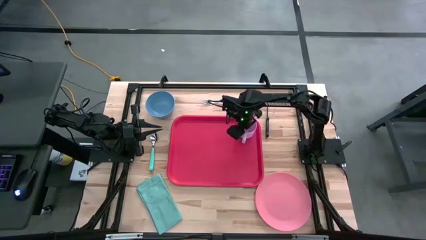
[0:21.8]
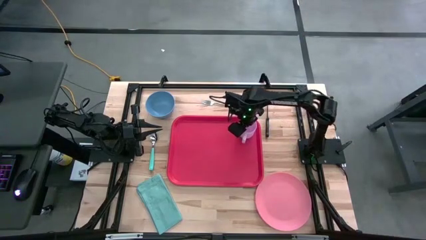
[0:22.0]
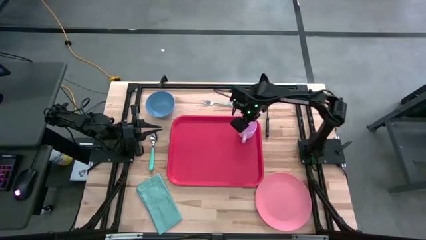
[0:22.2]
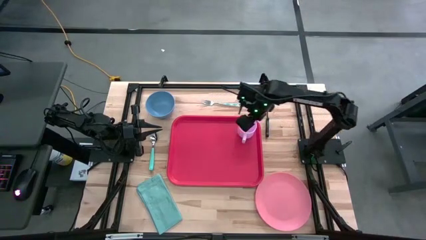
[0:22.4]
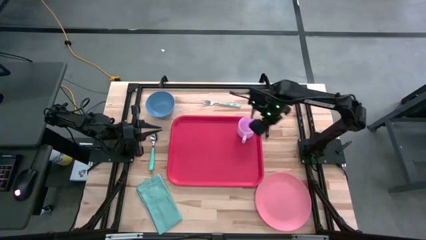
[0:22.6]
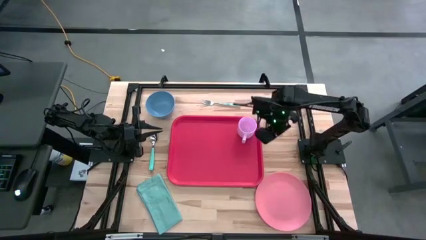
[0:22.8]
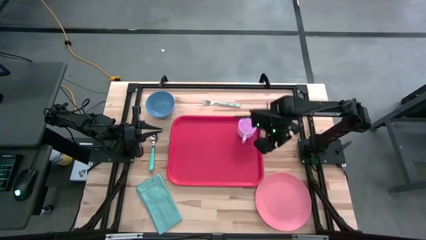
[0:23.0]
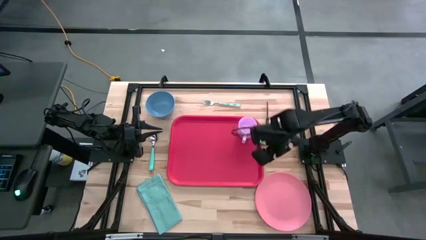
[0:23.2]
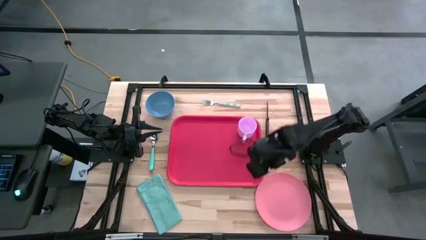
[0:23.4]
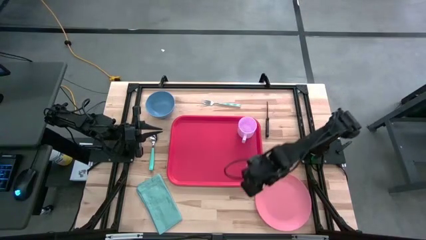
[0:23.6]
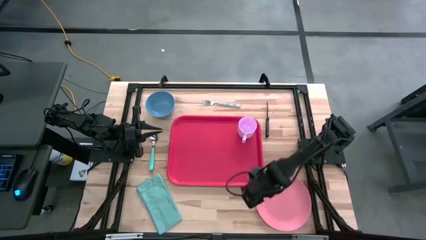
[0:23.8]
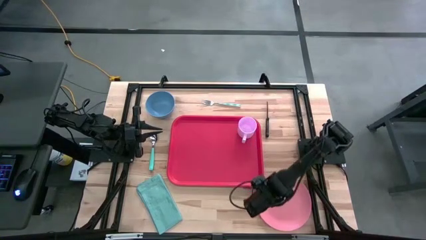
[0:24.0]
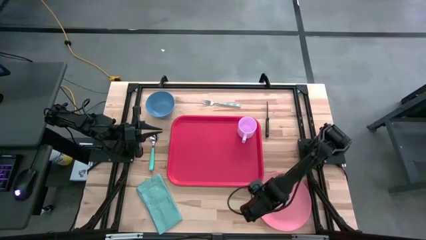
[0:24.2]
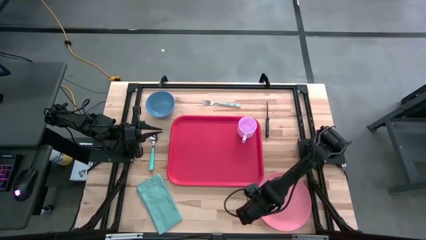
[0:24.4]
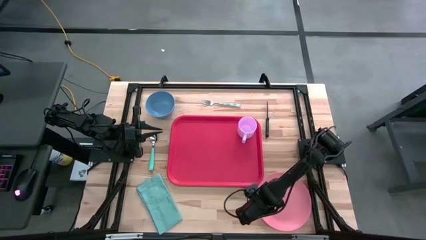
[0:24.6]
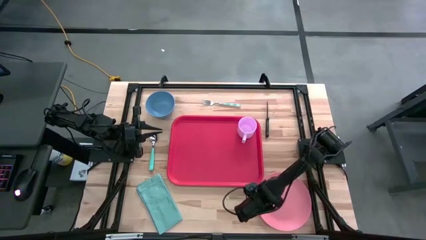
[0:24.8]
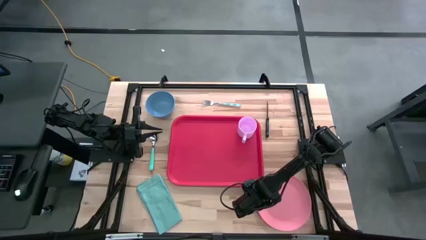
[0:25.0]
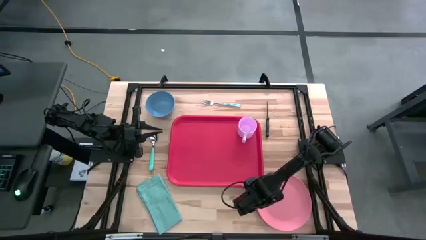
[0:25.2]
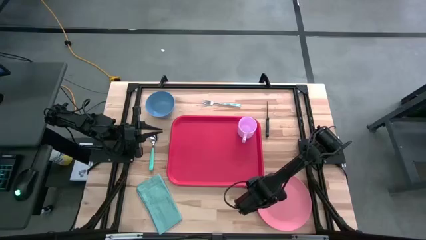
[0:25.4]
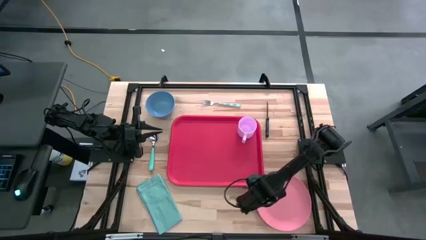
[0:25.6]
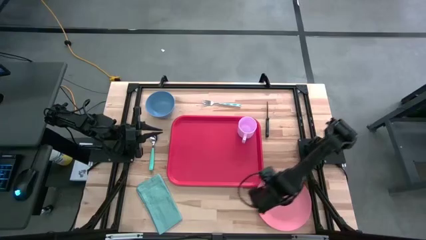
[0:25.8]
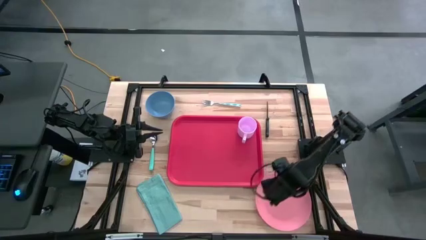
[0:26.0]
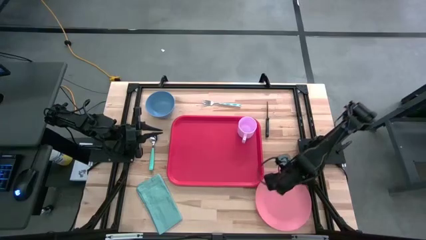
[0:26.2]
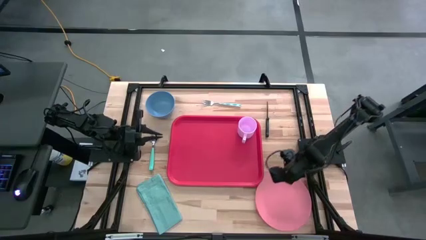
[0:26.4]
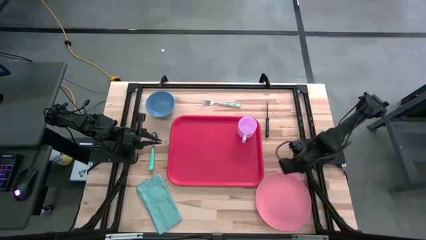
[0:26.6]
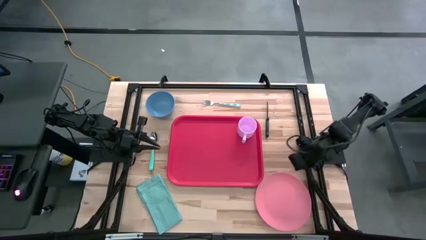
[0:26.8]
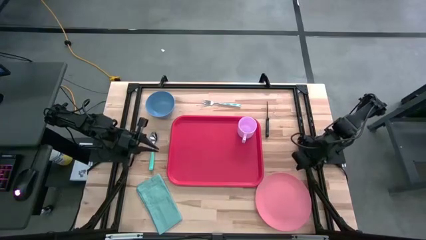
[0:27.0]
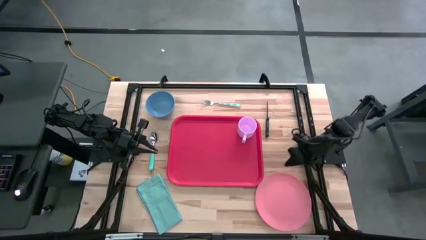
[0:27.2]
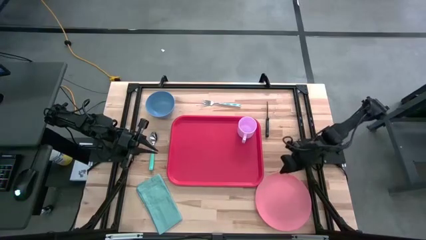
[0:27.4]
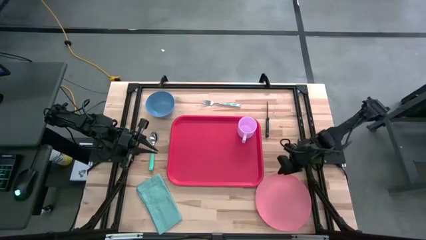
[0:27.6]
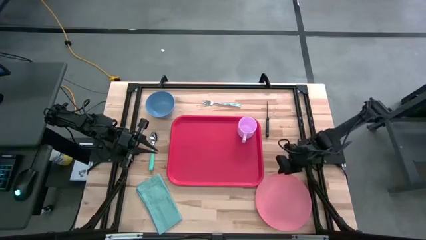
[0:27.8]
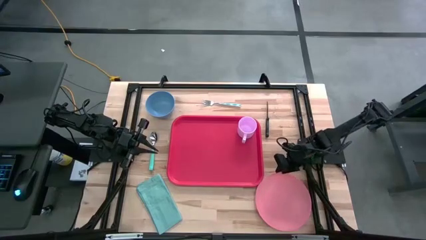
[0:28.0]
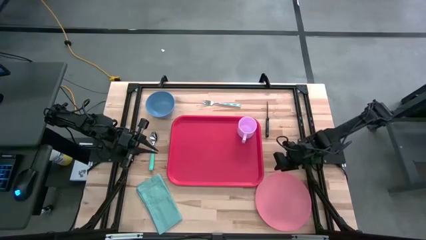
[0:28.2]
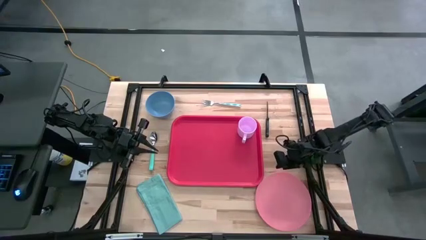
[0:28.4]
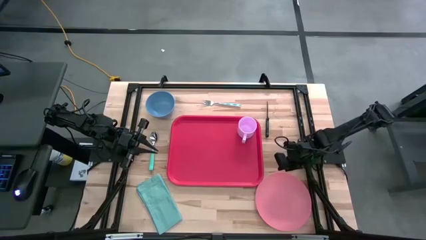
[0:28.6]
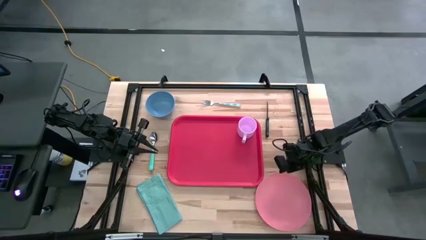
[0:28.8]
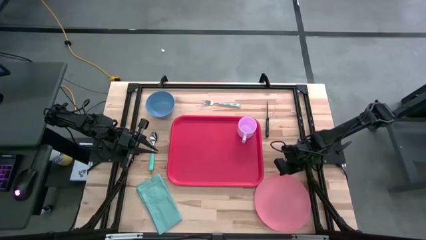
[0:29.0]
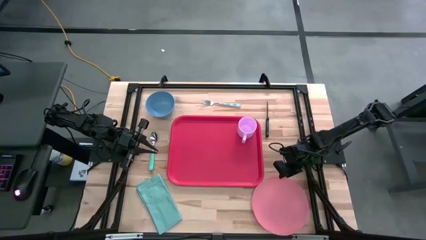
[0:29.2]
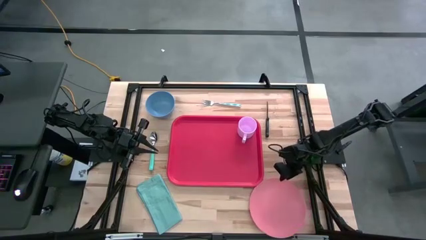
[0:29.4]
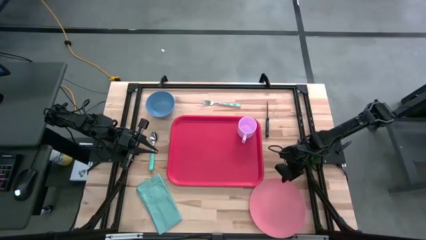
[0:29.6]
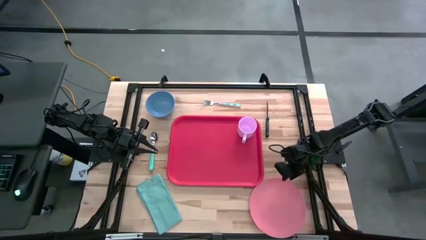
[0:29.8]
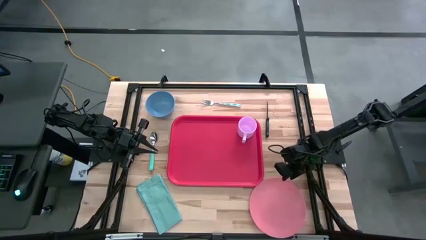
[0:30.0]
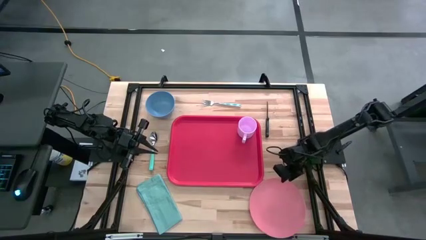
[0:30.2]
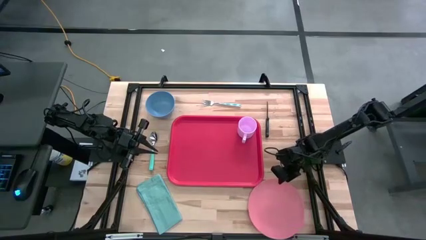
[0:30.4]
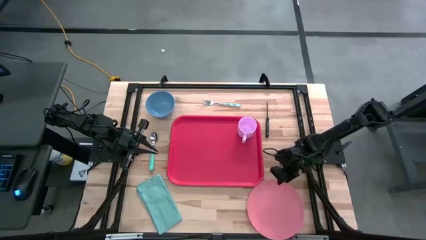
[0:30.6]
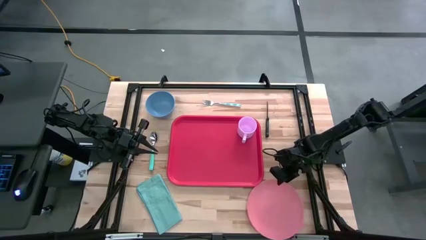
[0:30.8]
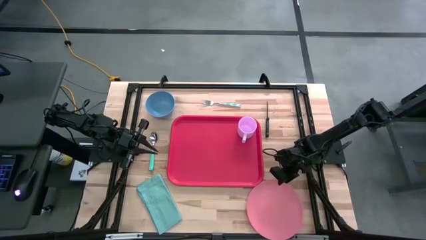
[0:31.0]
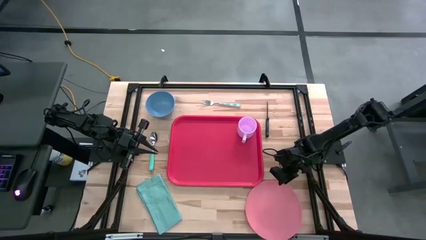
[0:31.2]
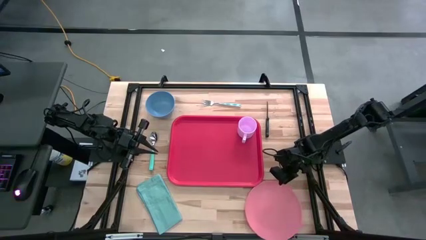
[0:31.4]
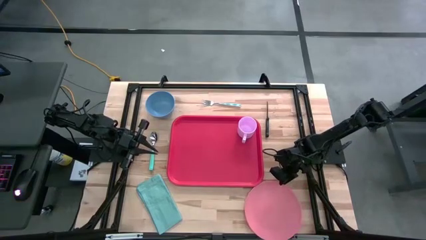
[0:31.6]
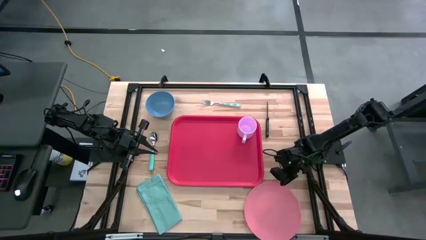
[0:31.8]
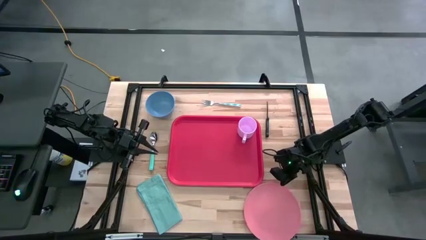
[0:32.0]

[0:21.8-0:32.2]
Task: Set up tray
Put the pink plate on the red tray to the bottom left of the purple cup

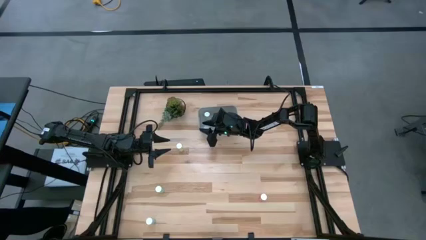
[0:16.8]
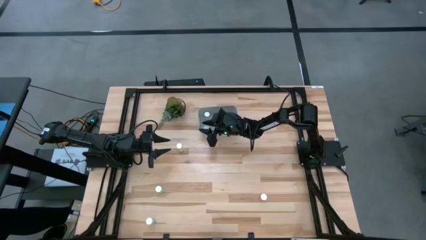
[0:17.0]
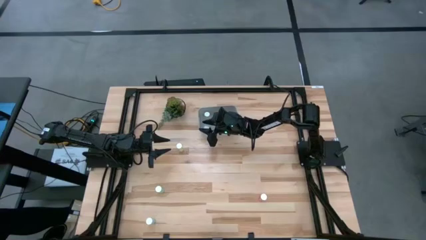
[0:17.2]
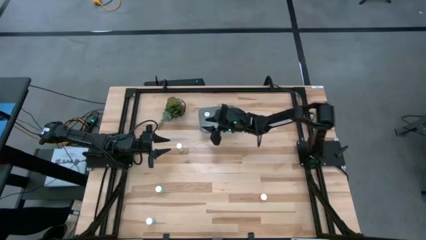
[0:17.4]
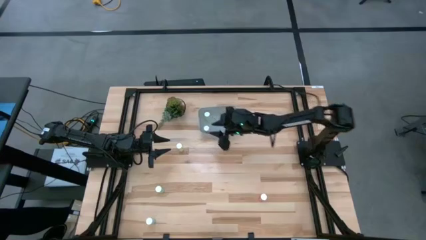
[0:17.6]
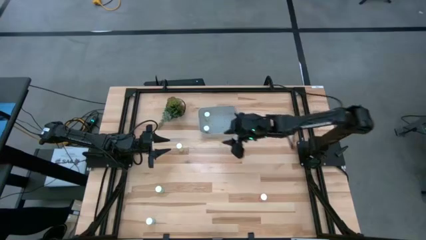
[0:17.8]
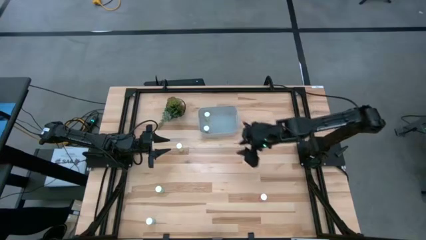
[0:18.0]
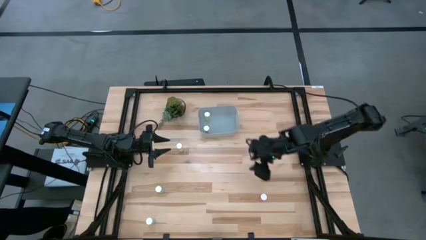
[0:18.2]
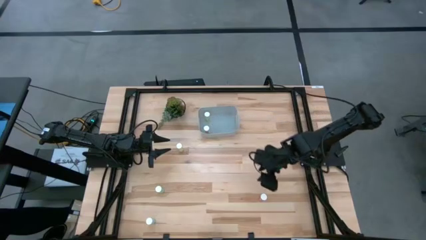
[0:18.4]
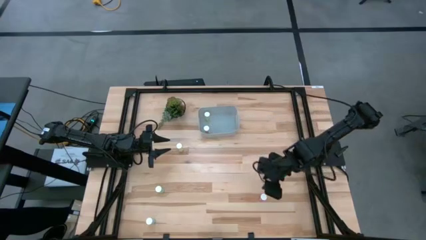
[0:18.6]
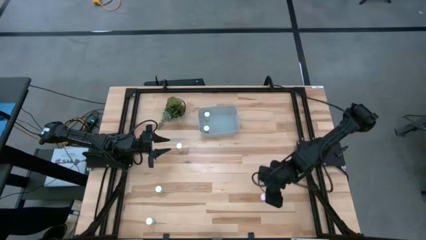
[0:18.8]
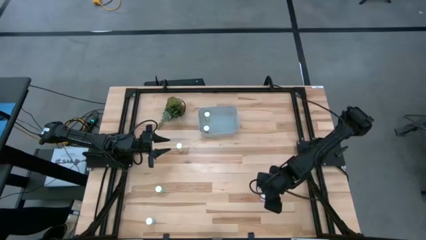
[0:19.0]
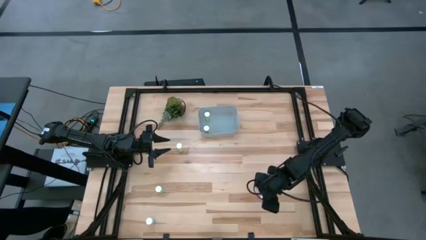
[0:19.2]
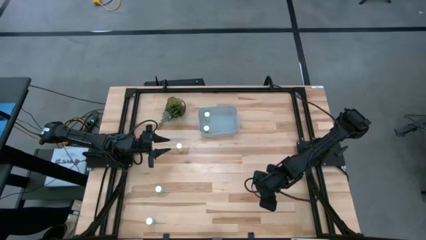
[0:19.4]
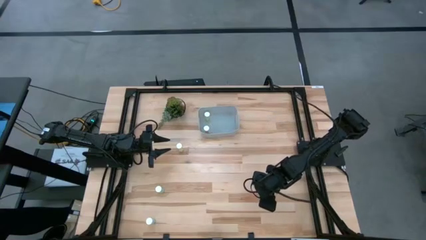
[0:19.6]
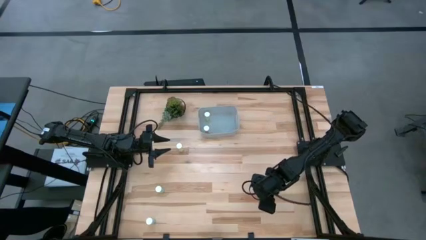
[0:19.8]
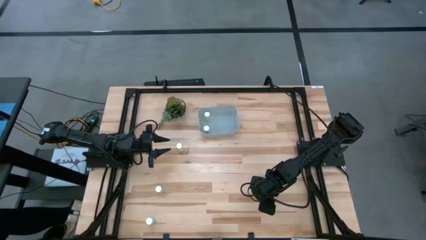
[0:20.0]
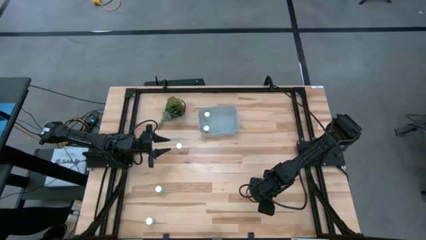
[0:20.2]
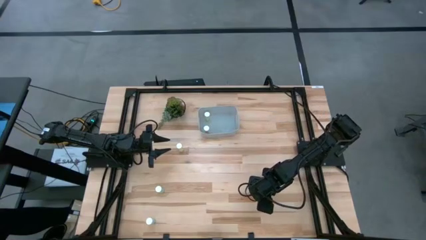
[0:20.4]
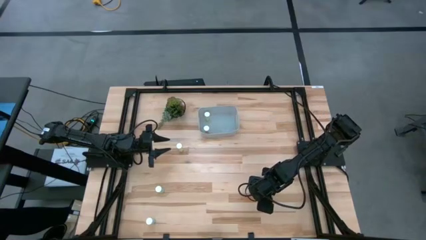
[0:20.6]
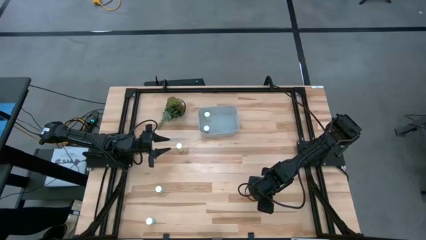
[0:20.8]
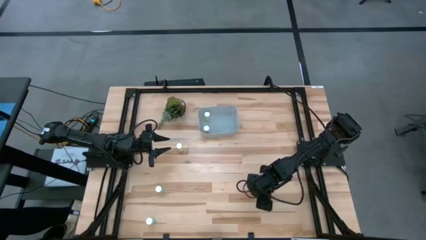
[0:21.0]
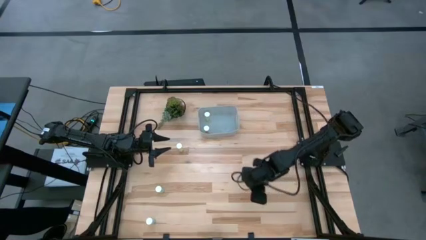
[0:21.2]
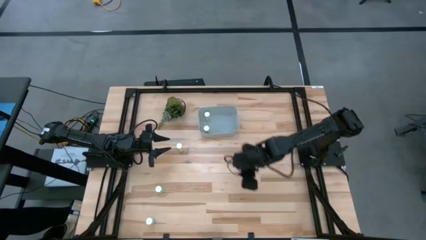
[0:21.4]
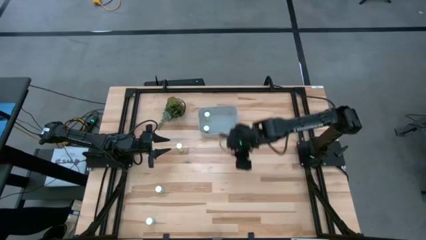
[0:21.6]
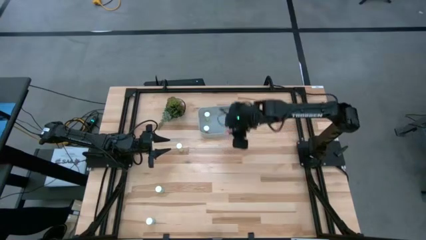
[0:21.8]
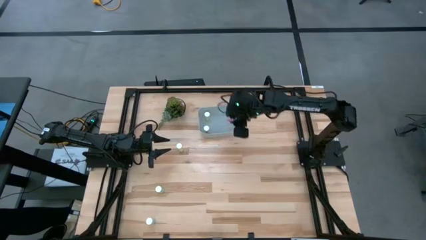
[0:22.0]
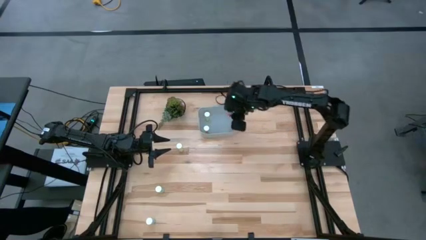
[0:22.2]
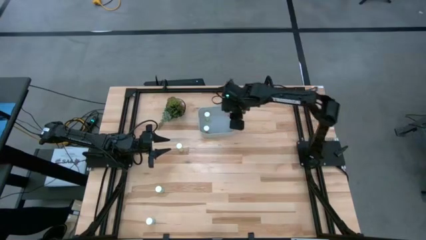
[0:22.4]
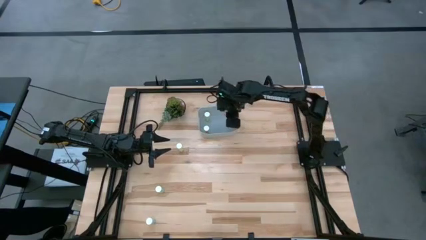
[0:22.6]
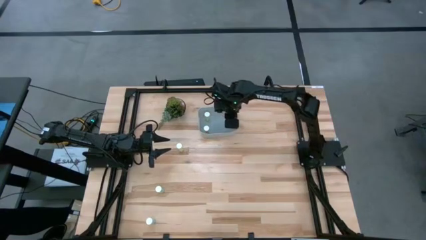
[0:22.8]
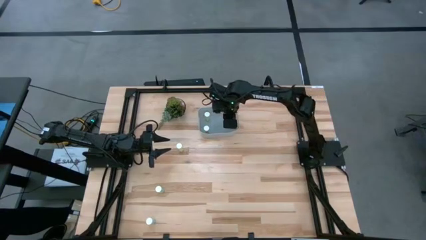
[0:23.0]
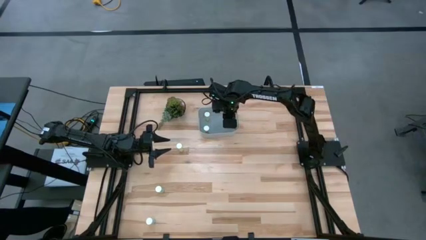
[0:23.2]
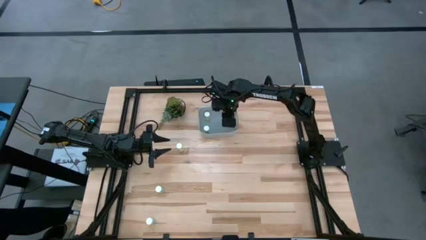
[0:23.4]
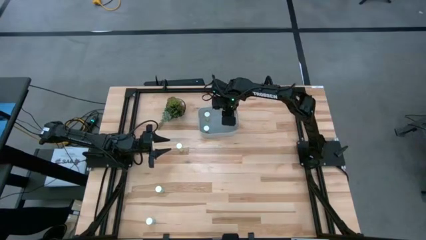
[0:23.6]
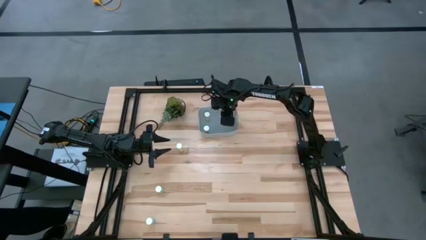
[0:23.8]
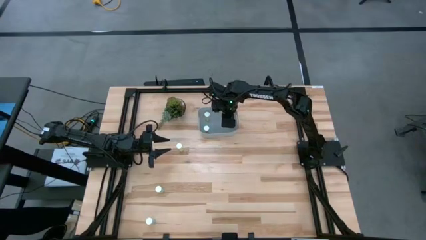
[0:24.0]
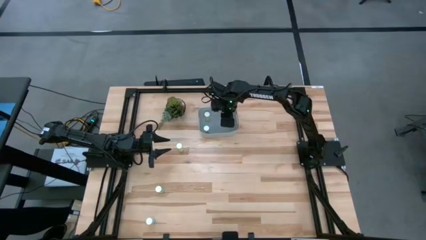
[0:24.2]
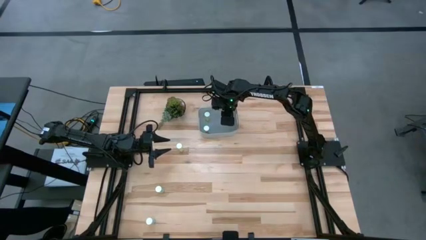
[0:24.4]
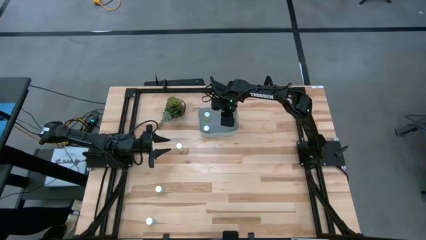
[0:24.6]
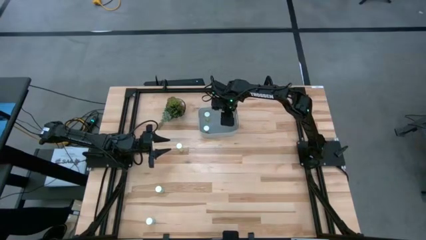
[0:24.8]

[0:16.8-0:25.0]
Task: Pick and place pill bottles into a basket
Put the red pill bottle into the bin
